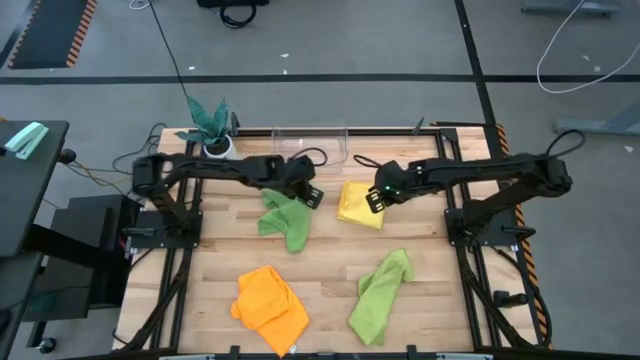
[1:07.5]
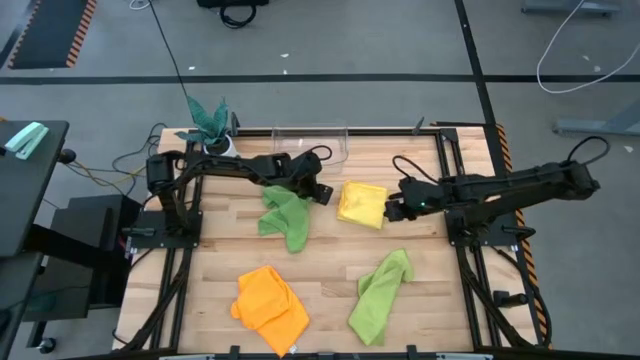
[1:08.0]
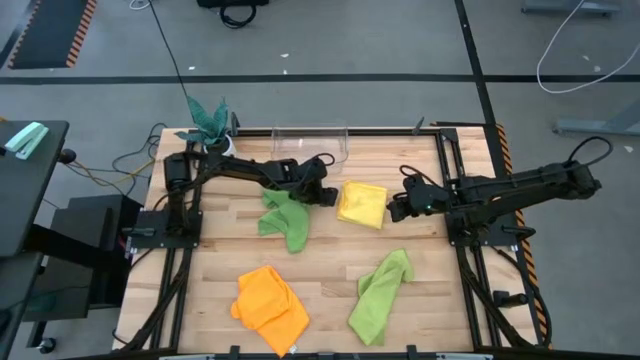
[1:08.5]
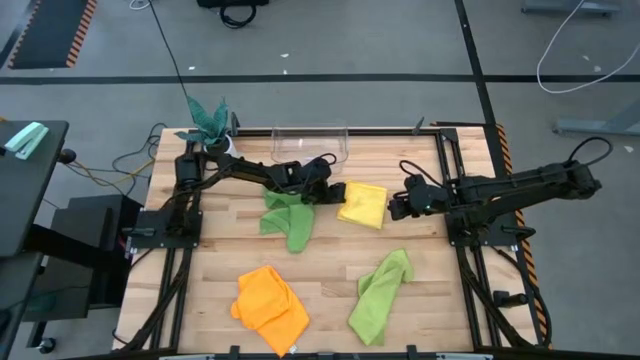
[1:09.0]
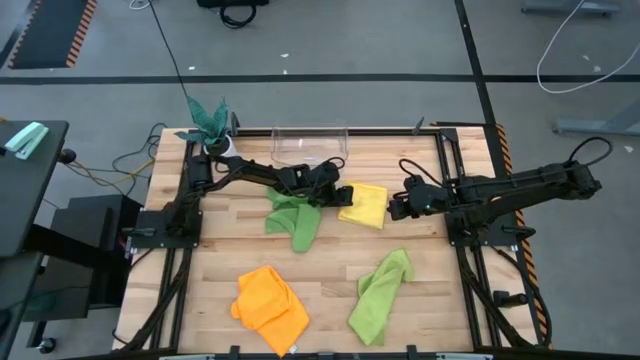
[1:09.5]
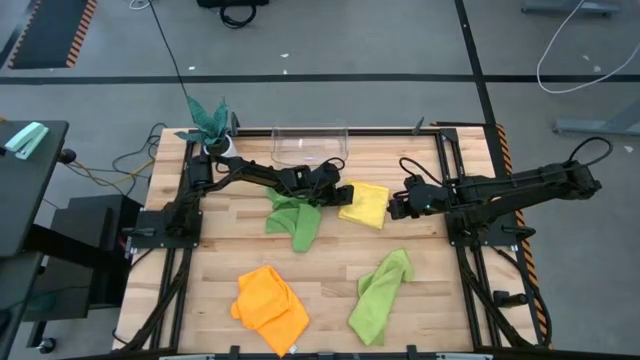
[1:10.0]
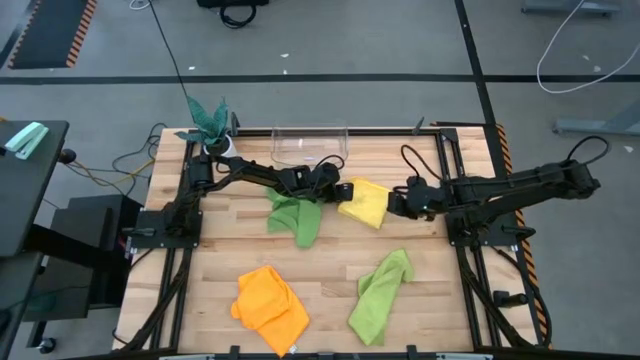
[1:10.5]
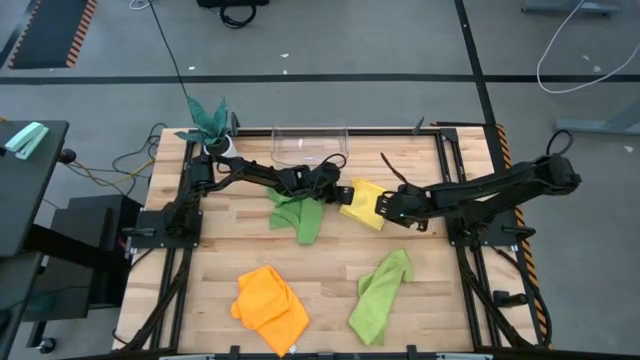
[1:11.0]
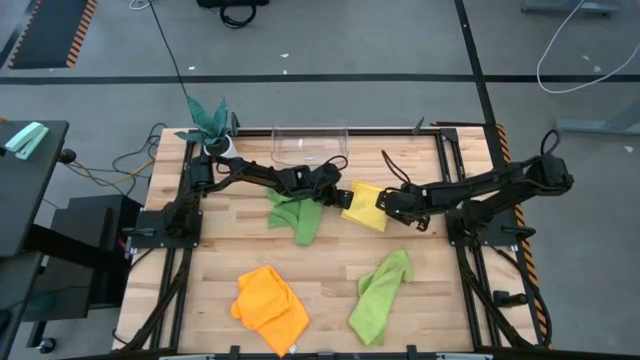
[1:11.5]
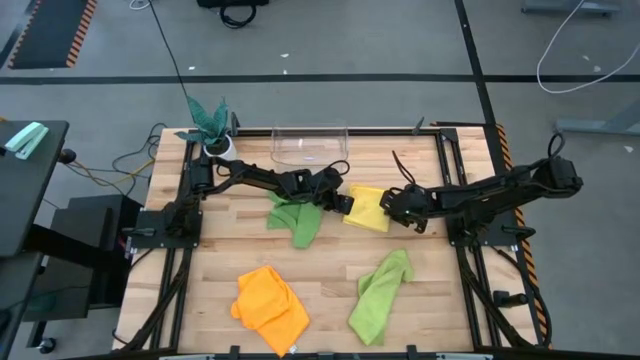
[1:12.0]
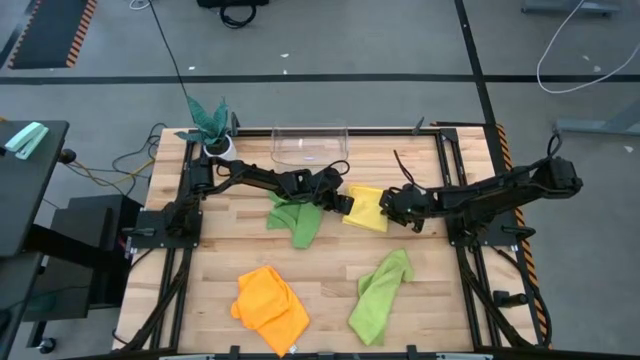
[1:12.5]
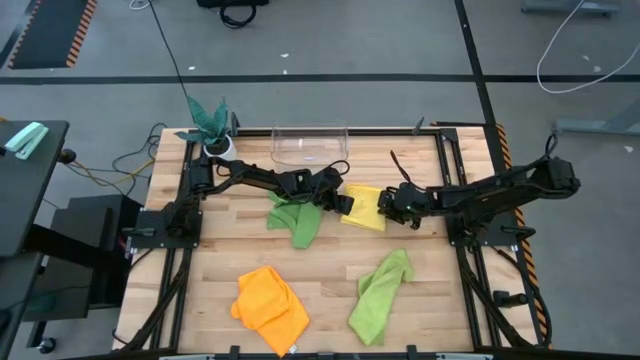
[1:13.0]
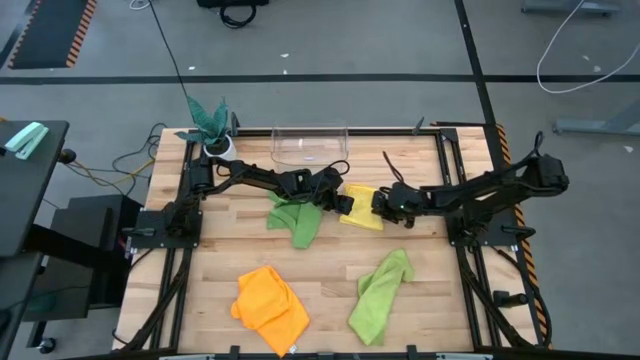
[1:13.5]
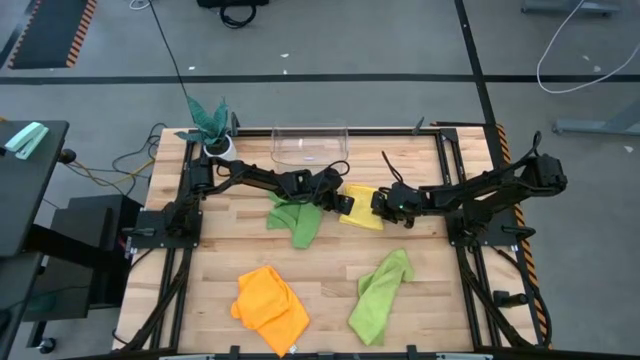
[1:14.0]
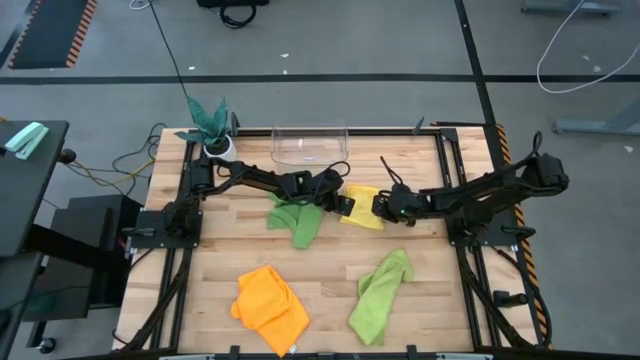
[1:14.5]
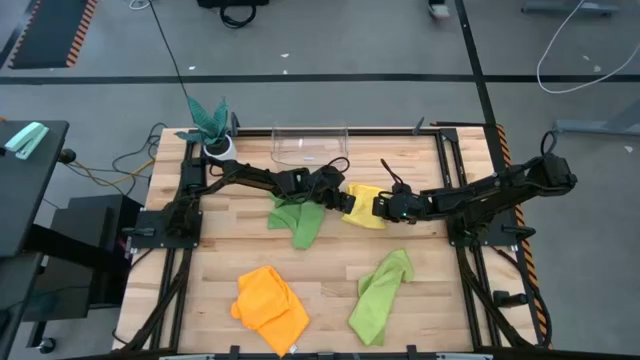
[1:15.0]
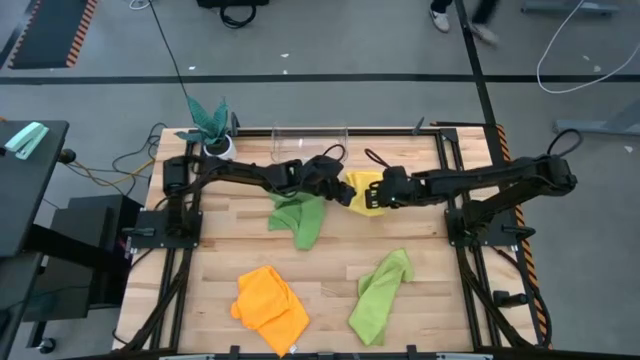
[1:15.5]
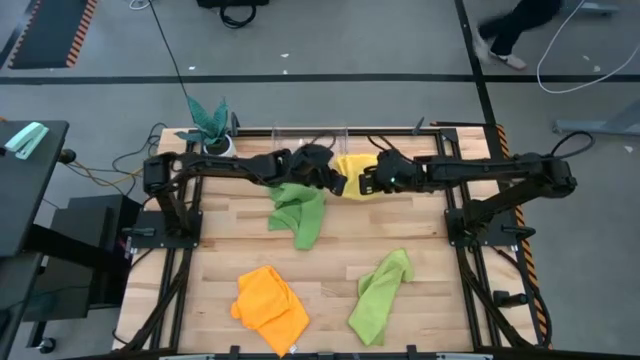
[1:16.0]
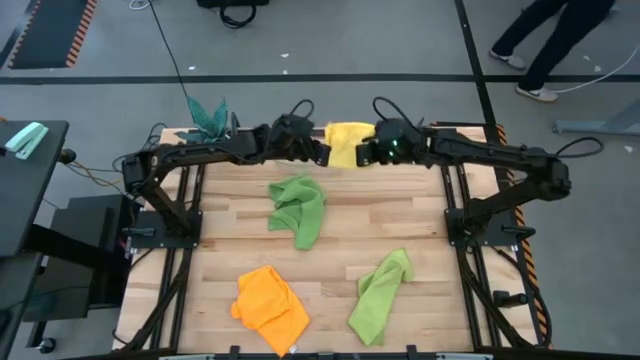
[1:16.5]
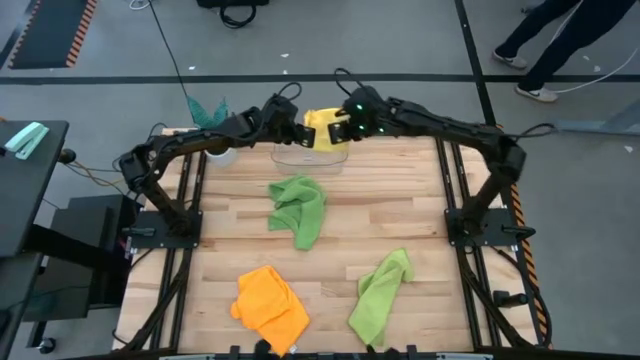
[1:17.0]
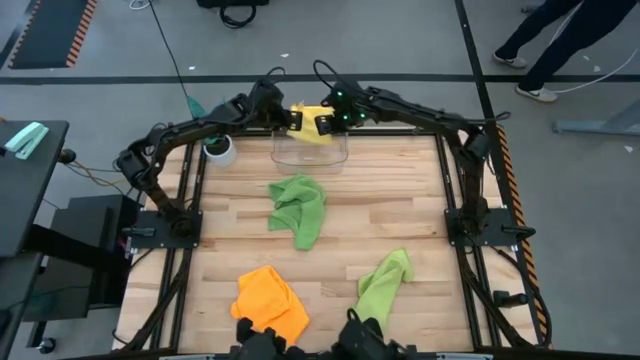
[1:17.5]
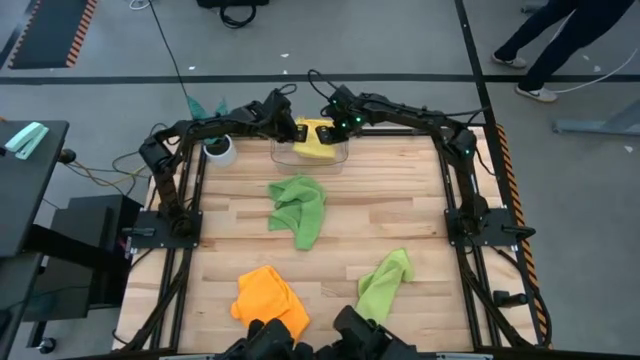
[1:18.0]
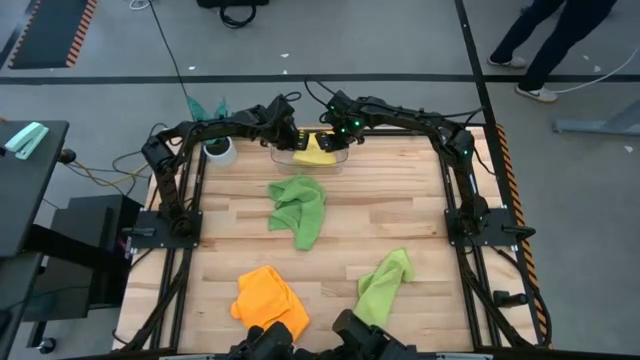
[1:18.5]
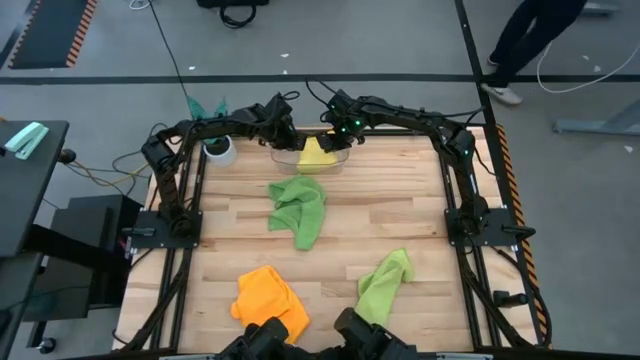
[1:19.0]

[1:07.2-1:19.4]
Task: Fold microfiber towels
Put the yellow towel into the transparent bin

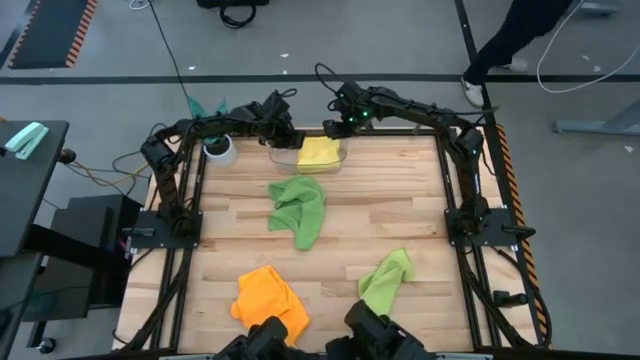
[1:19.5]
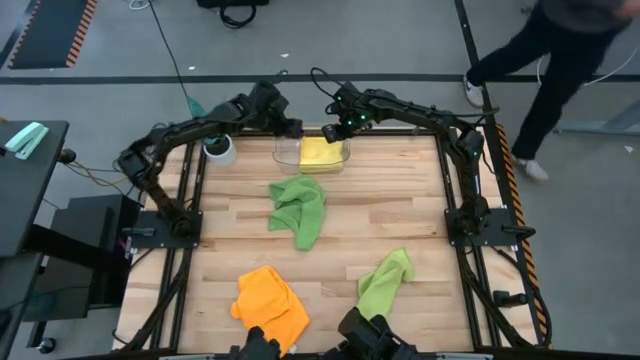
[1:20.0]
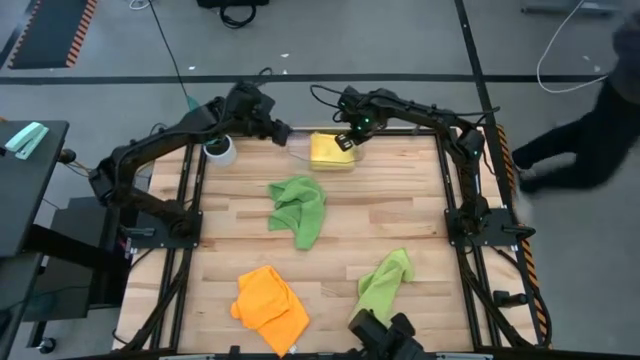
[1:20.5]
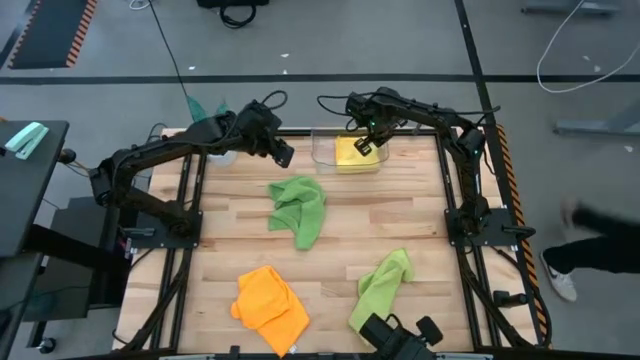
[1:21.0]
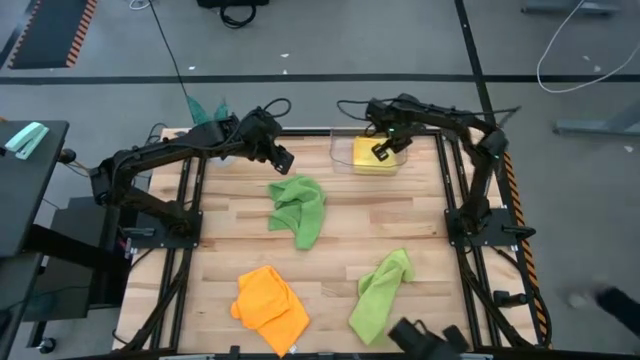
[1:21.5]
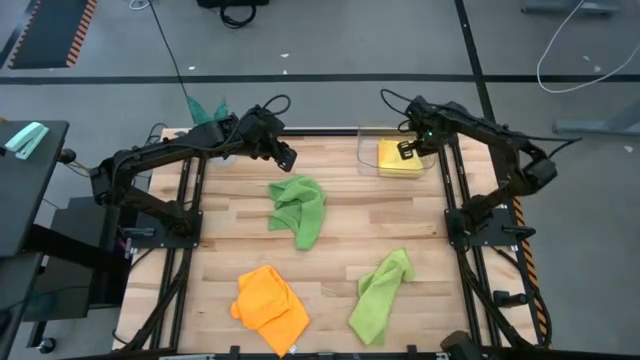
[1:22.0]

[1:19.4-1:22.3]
Move the transparent bin to the top right of the table

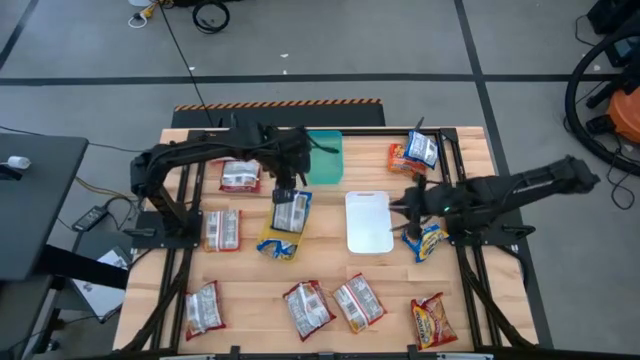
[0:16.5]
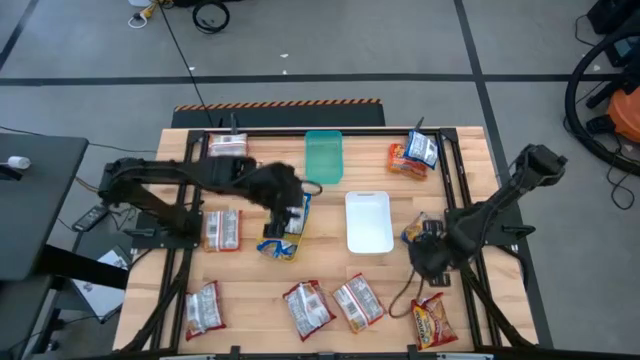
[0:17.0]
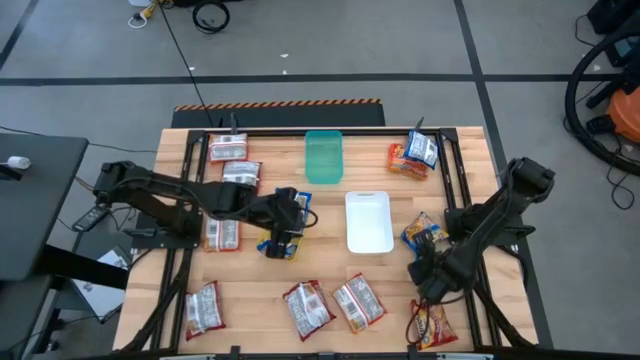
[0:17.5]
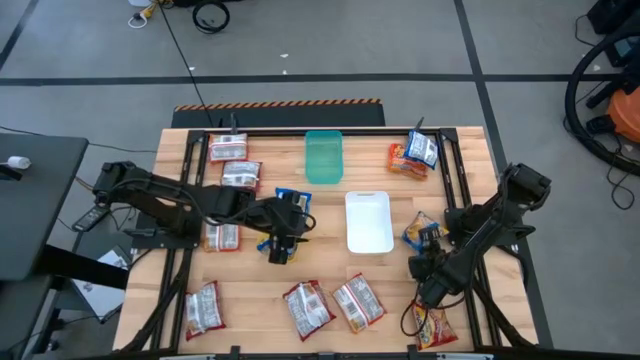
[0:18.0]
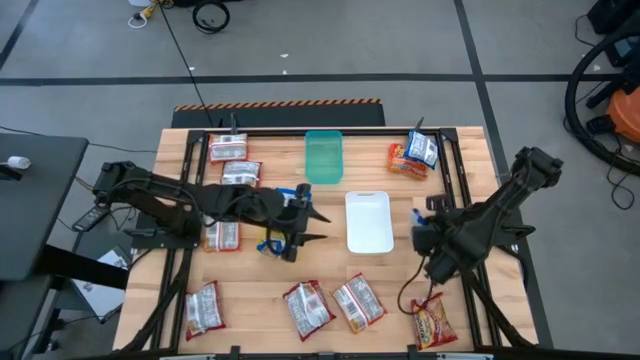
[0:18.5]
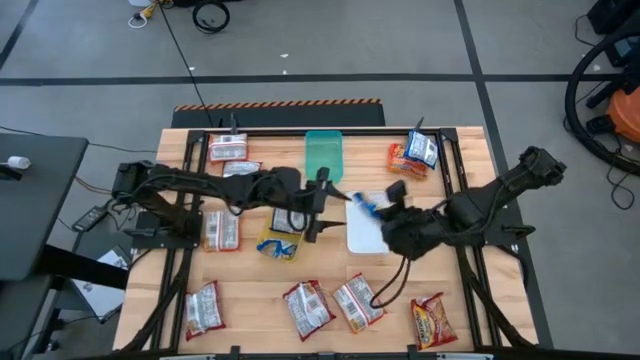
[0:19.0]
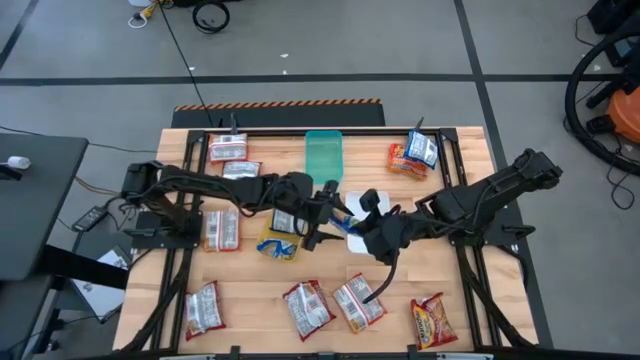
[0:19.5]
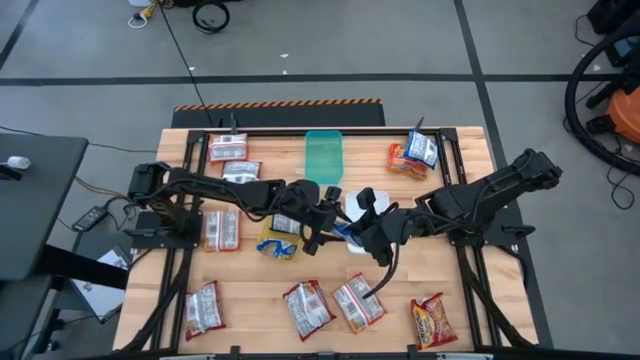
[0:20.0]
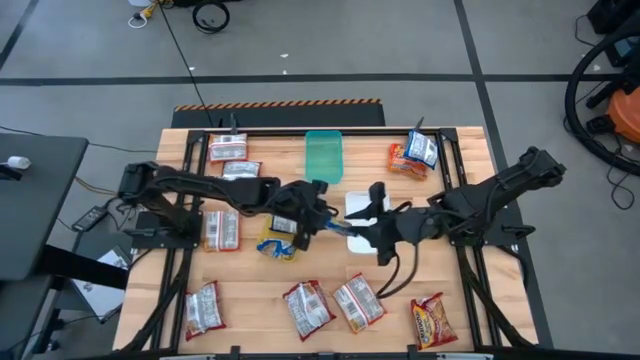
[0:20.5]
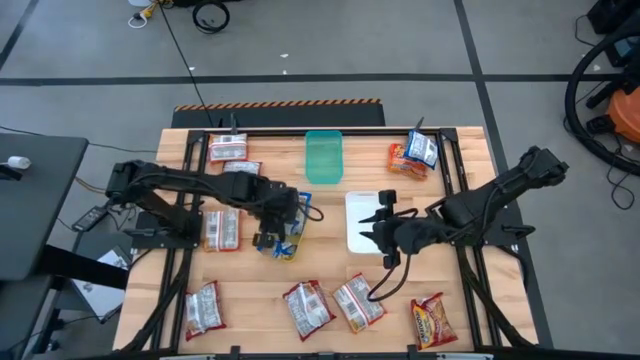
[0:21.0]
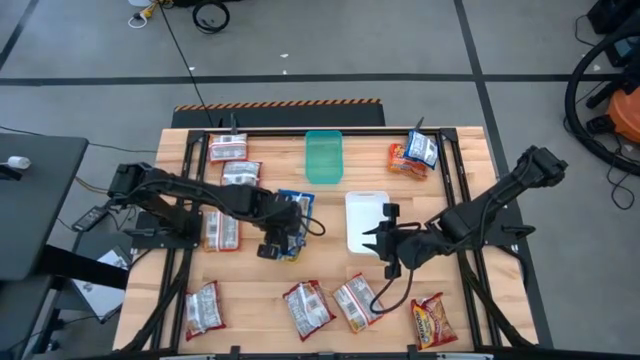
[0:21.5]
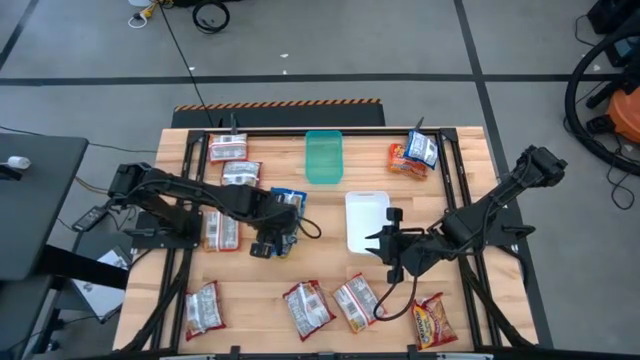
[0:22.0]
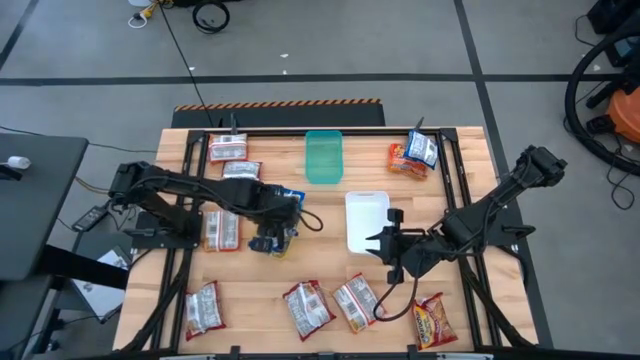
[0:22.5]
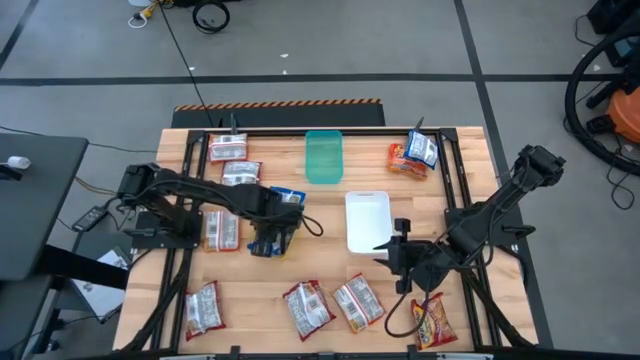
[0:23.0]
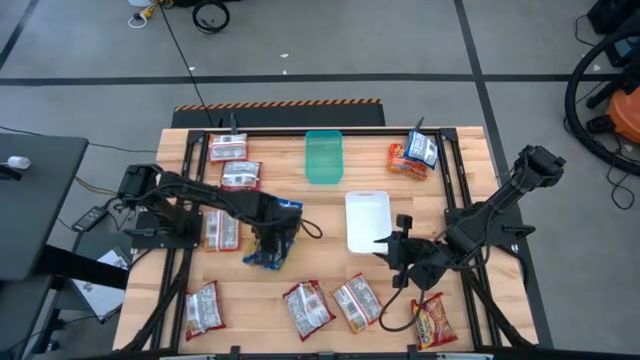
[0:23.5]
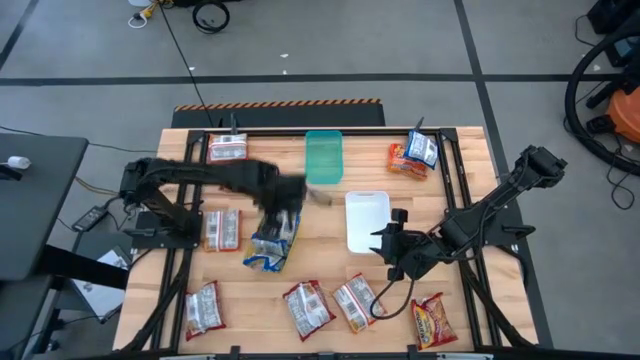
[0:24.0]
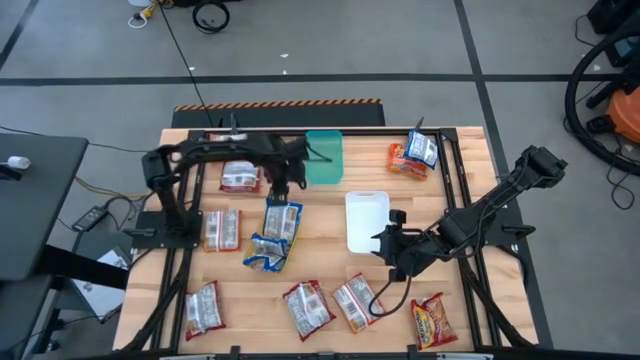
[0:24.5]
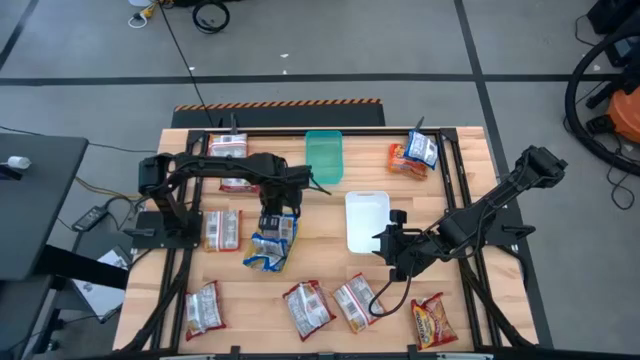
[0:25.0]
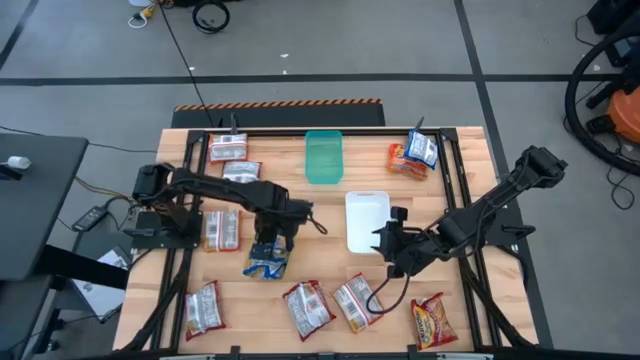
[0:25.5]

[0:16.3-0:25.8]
Task: Sort Maruchan noodles
Put the bottom right blue noodle pack into the yellow bin
